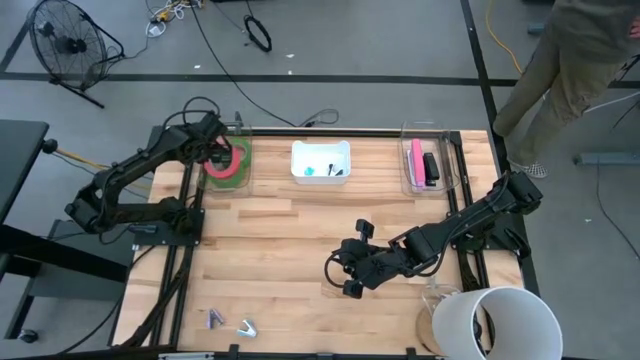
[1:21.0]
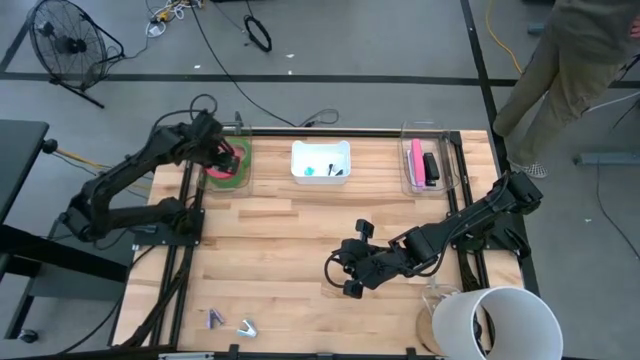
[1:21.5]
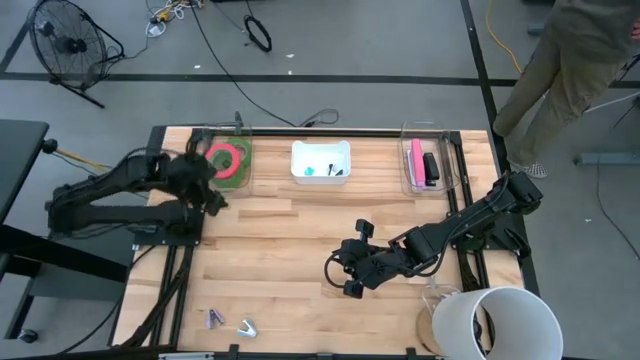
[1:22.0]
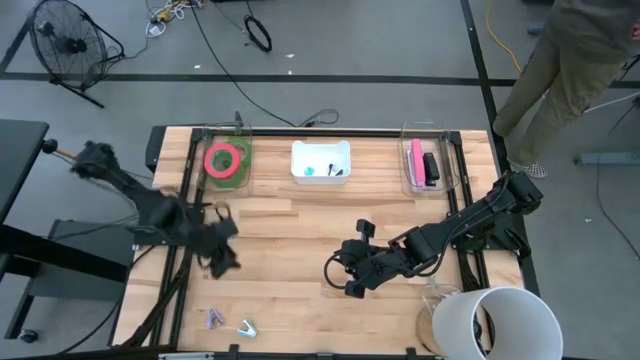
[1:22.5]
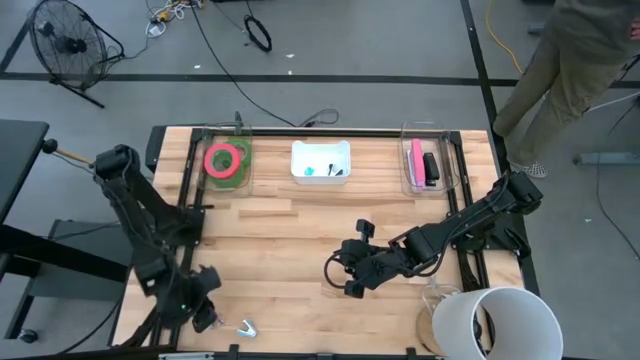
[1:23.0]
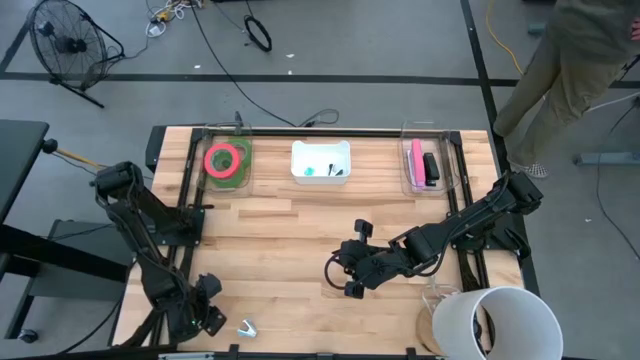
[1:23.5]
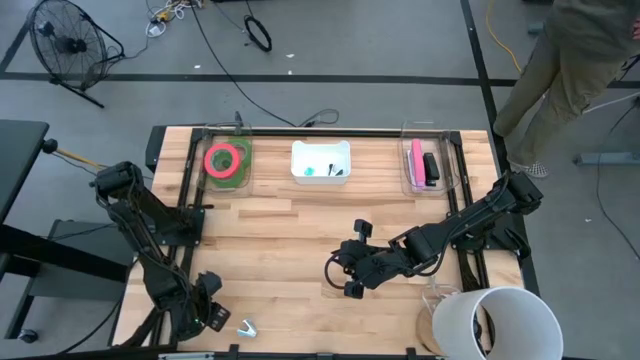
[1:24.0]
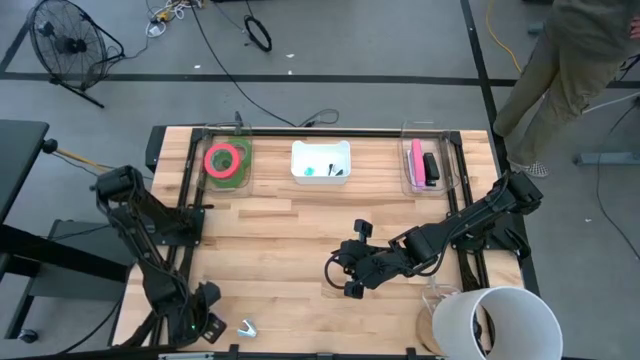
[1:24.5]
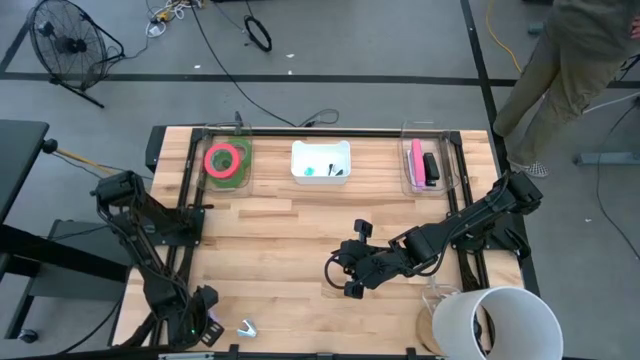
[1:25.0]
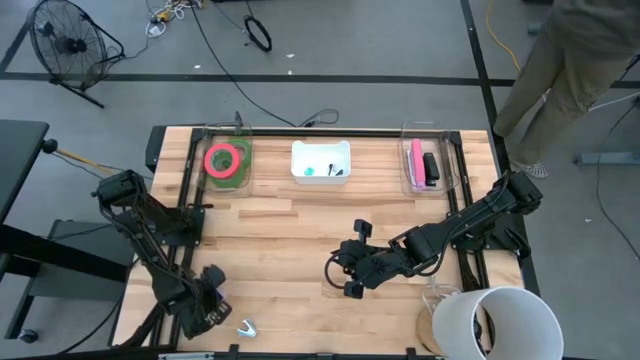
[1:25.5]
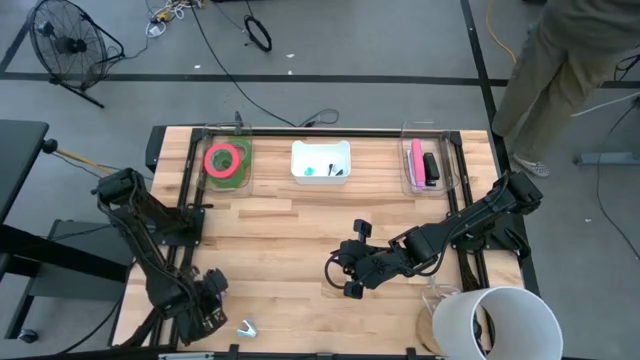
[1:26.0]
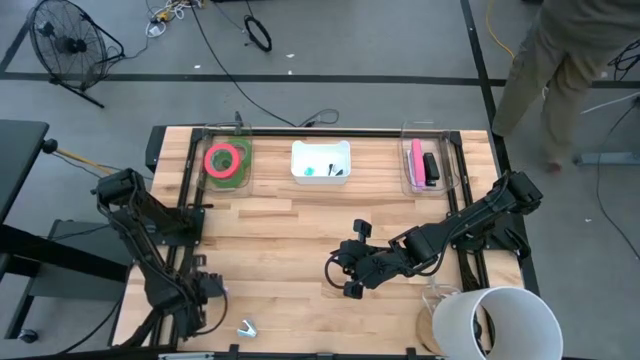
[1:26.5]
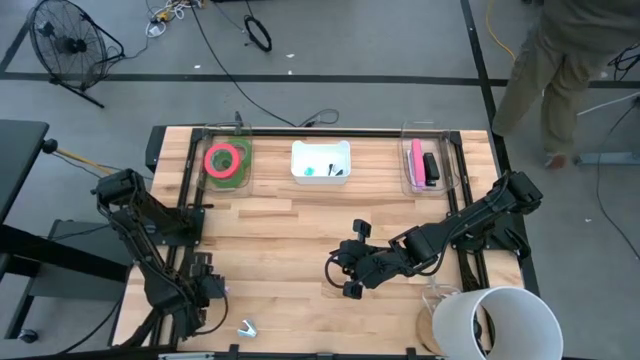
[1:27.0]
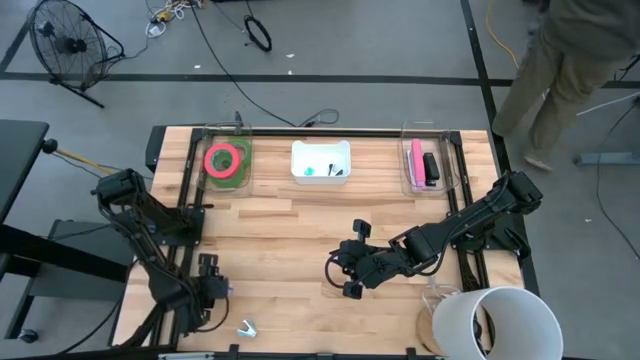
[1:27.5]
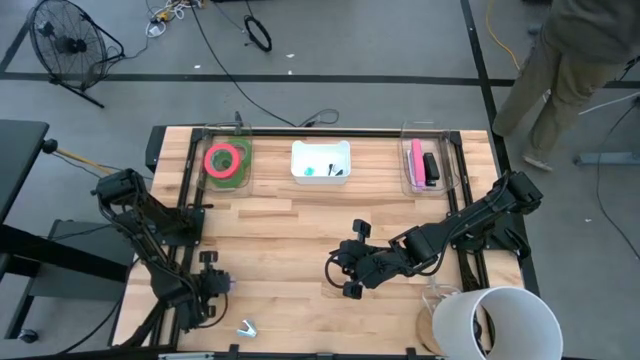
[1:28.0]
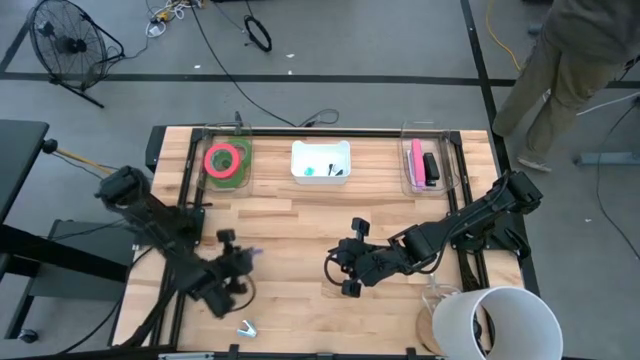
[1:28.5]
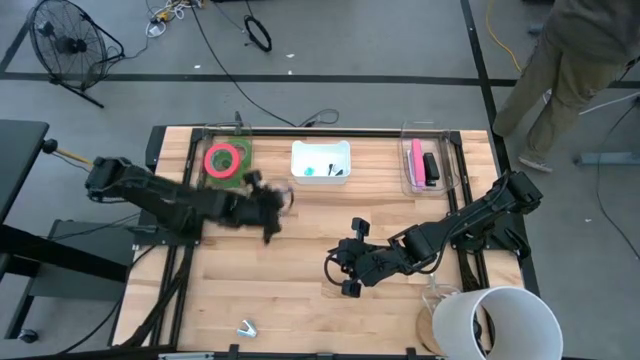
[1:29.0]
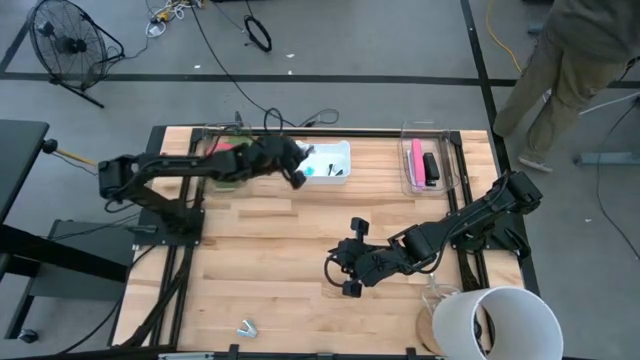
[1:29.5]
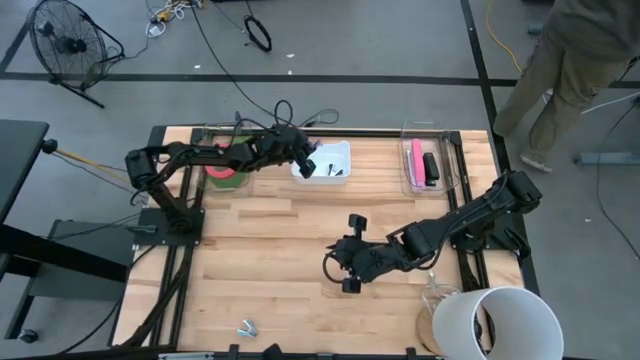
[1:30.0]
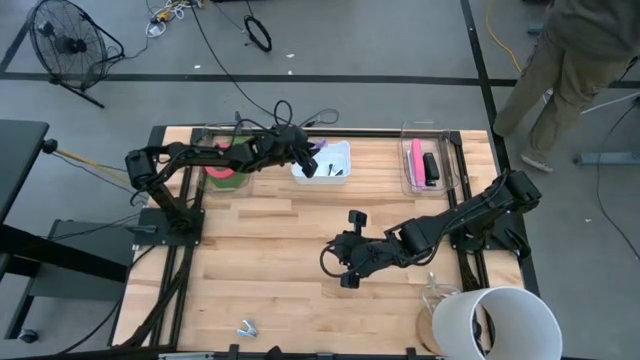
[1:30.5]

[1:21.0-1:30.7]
Task: Pick and place Stapler, Stapler remover, tape
Put the purple staple remover into the white bin

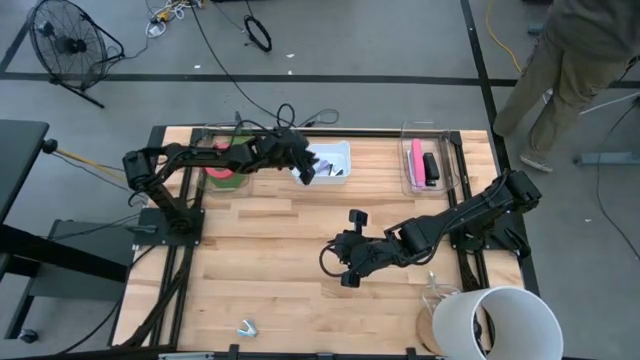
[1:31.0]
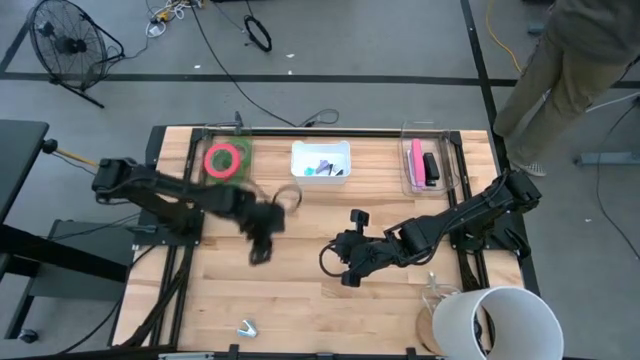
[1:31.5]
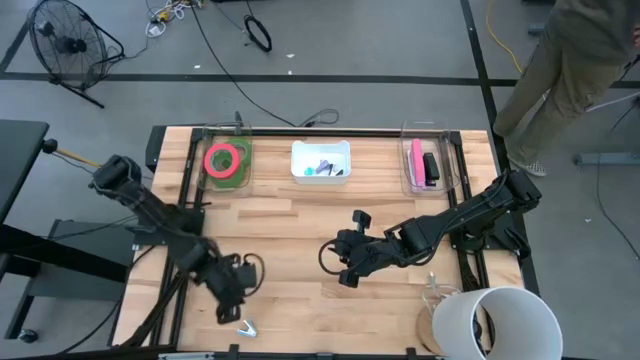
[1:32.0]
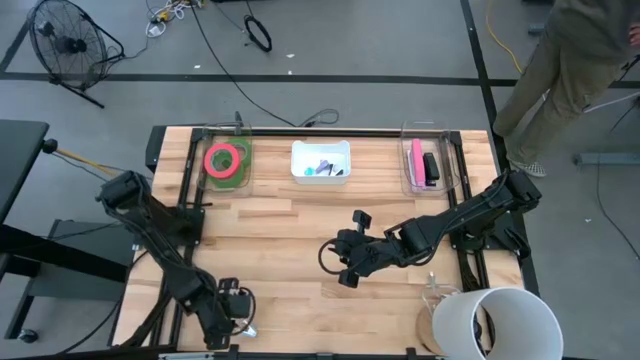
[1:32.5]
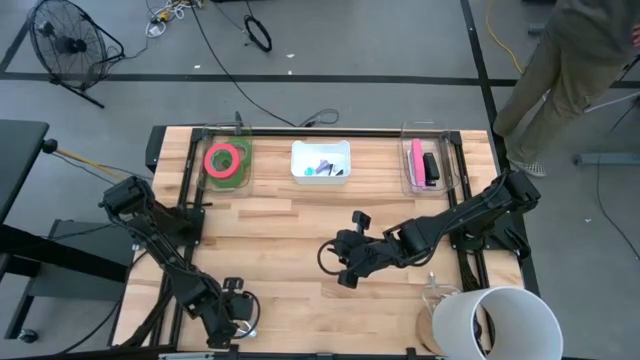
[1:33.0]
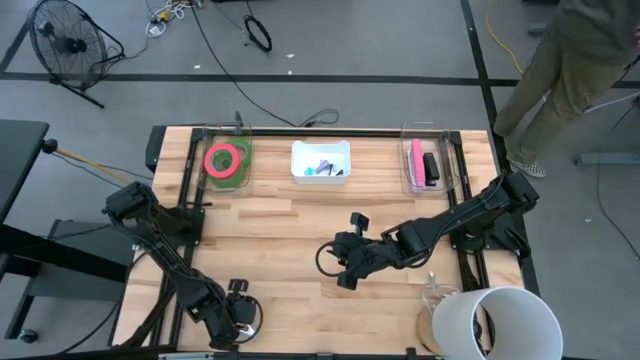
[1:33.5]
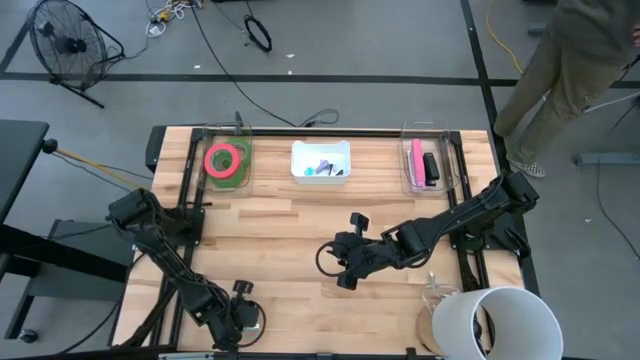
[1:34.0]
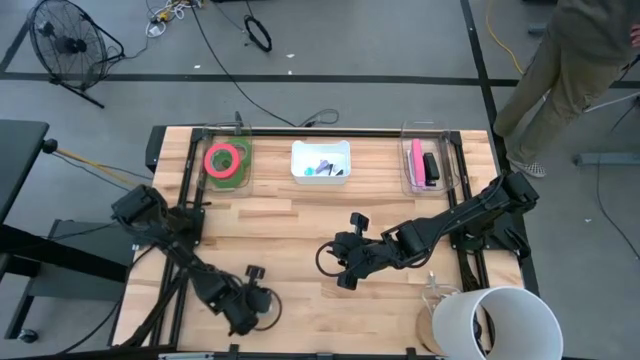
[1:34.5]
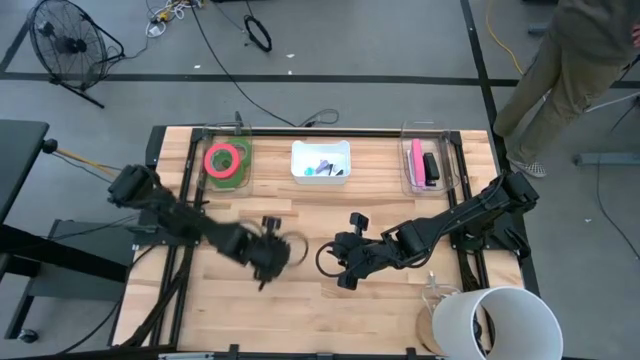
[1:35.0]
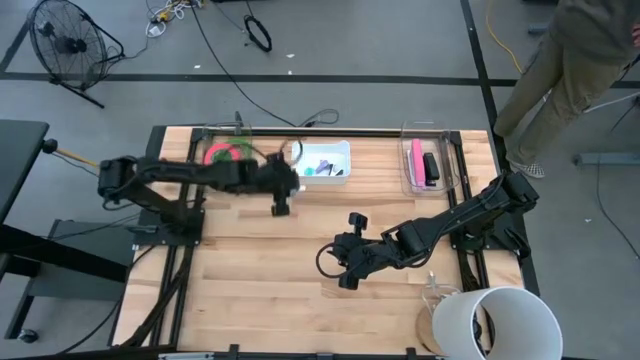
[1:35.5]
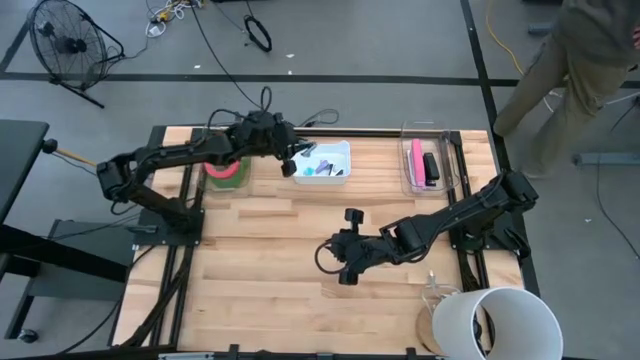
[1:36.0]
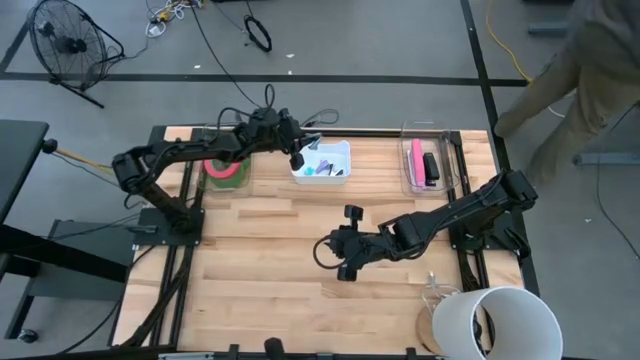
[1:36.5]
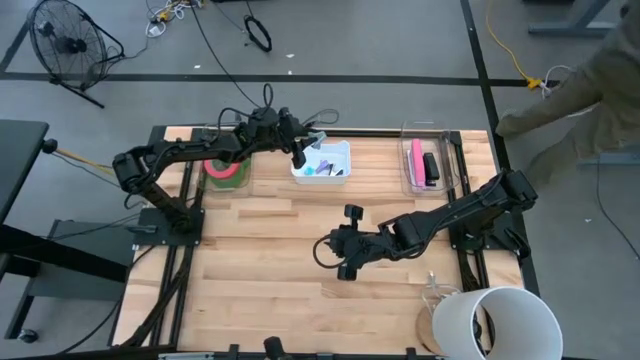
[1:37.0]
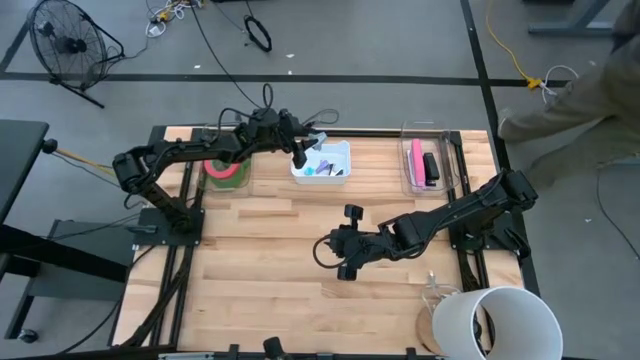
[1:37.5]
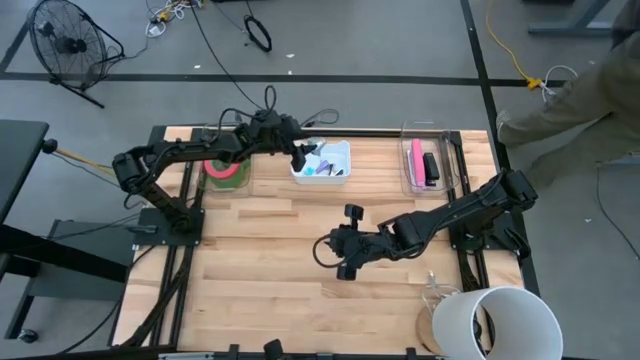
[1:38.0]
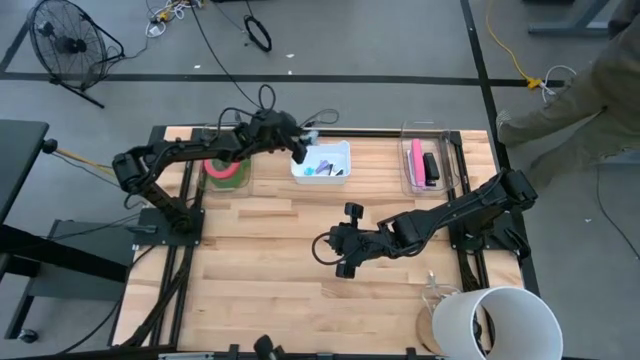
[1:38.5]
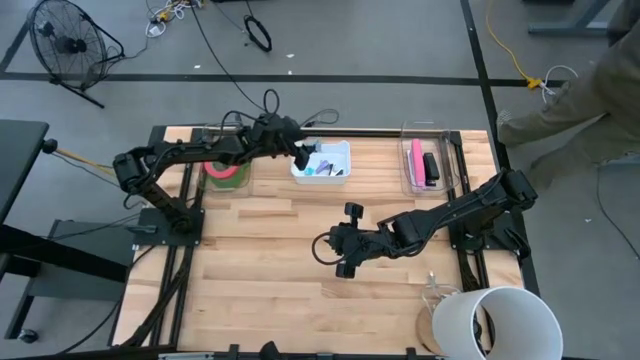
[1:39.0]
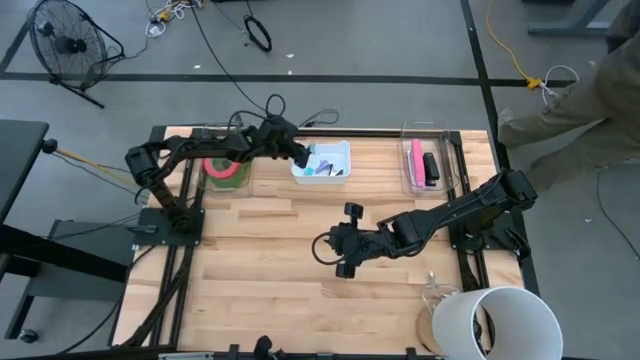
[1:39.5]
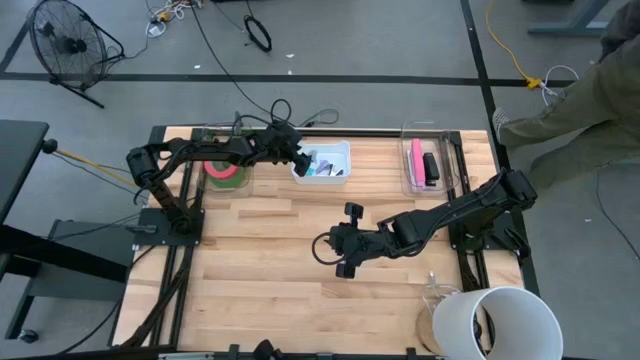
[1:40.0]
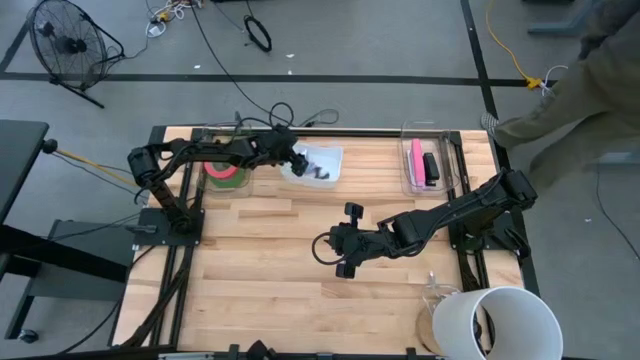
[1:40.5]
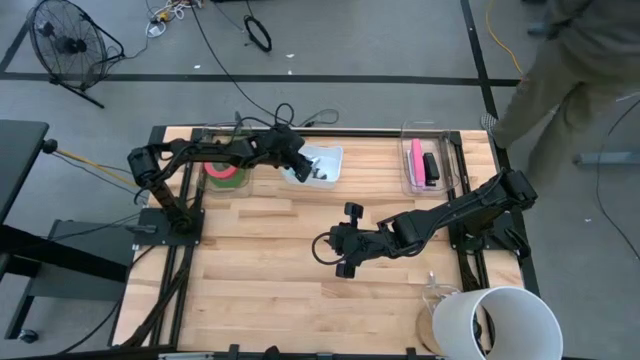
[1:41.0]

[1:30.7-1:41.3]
Put the blue staple remover into the white bin
